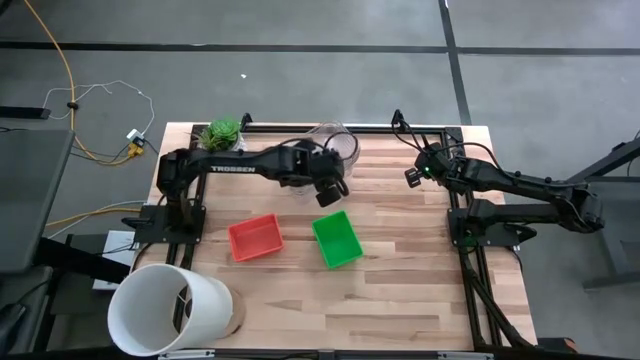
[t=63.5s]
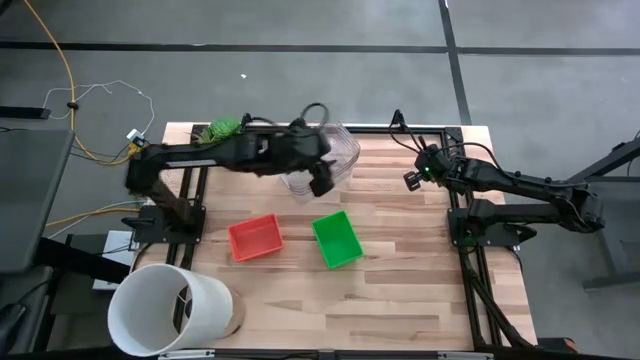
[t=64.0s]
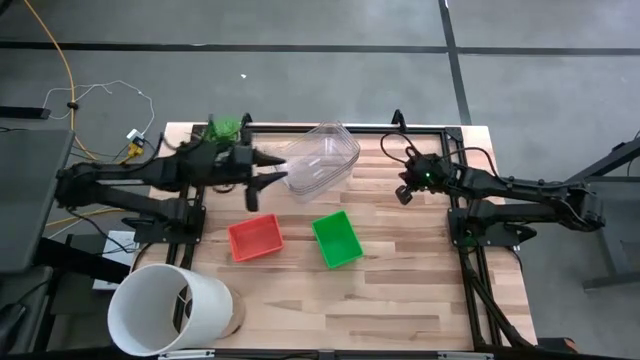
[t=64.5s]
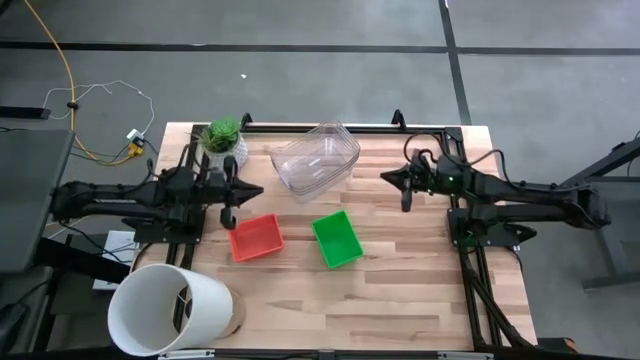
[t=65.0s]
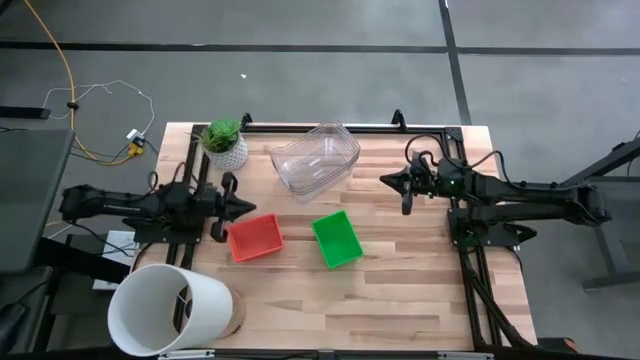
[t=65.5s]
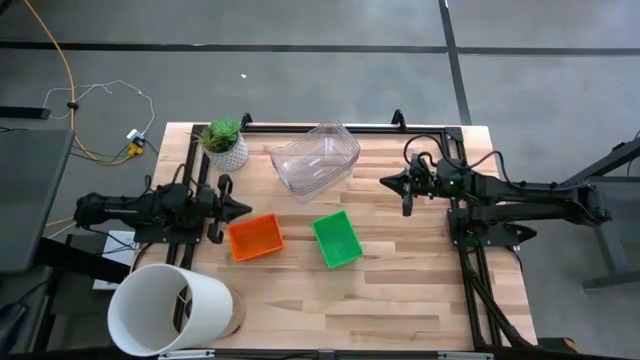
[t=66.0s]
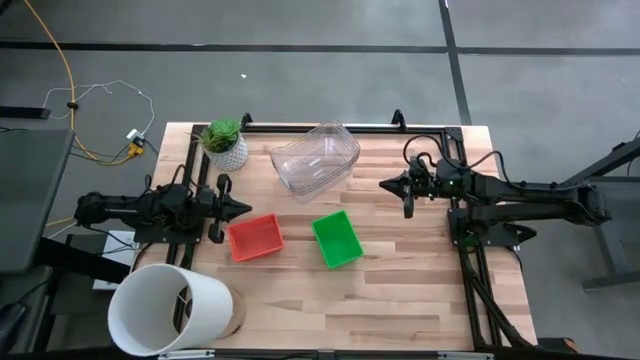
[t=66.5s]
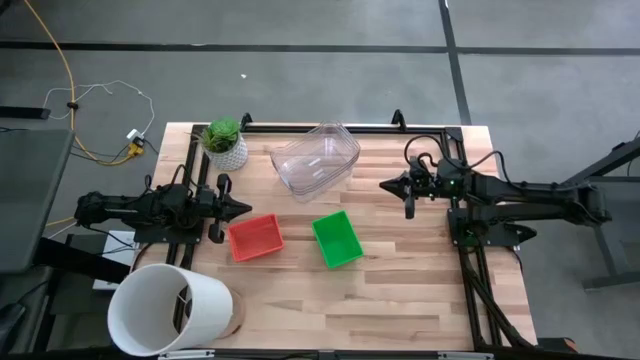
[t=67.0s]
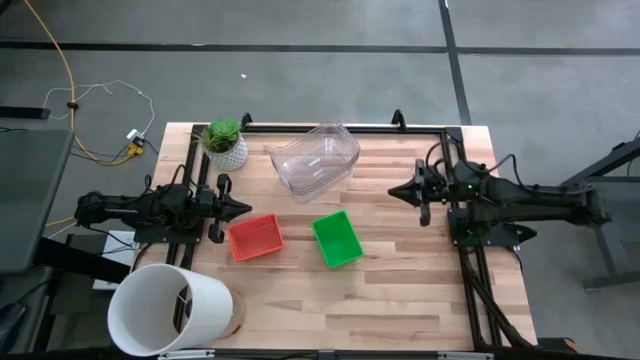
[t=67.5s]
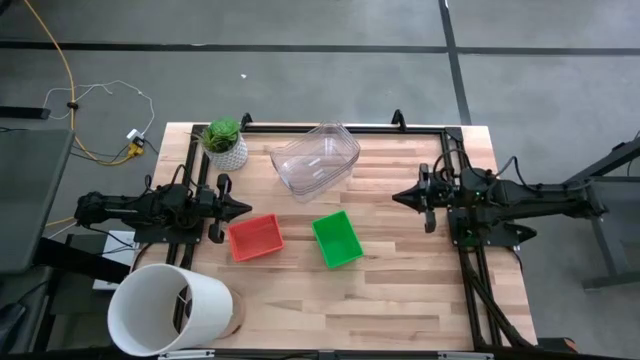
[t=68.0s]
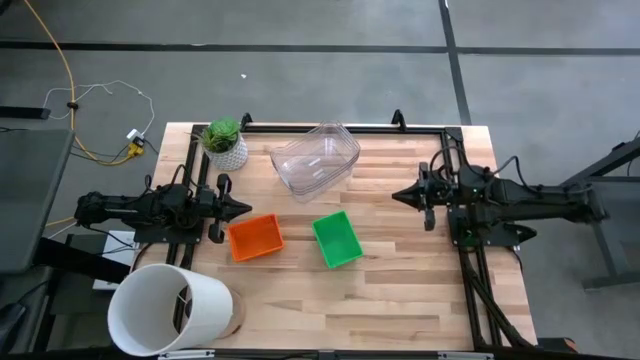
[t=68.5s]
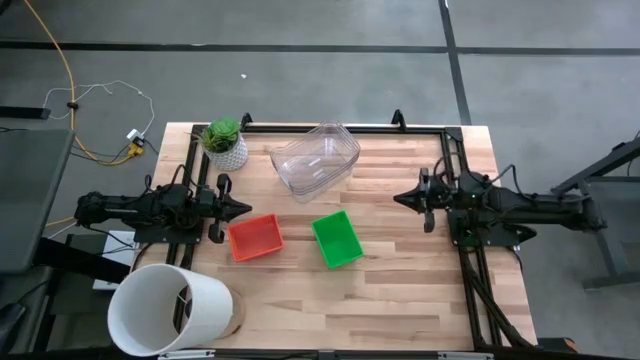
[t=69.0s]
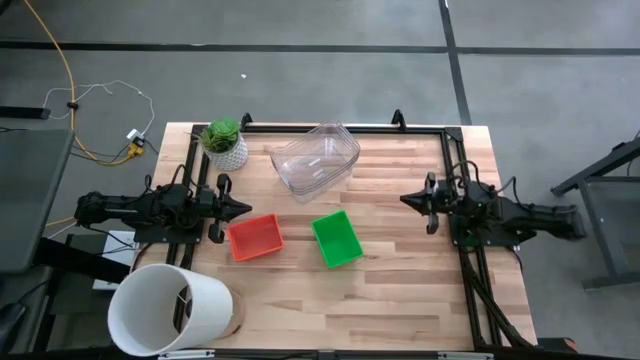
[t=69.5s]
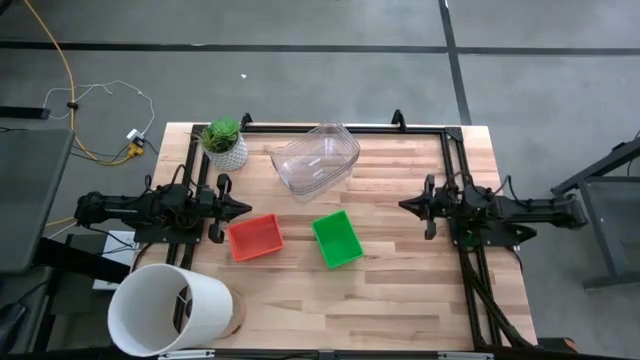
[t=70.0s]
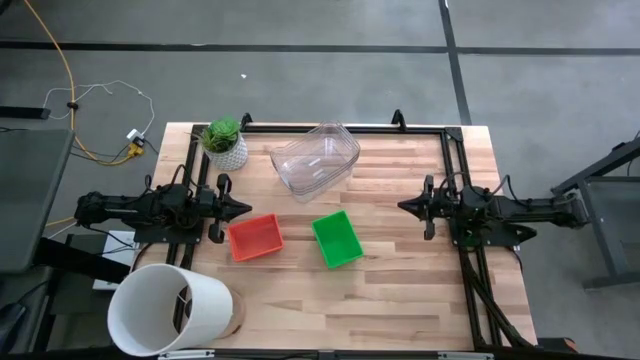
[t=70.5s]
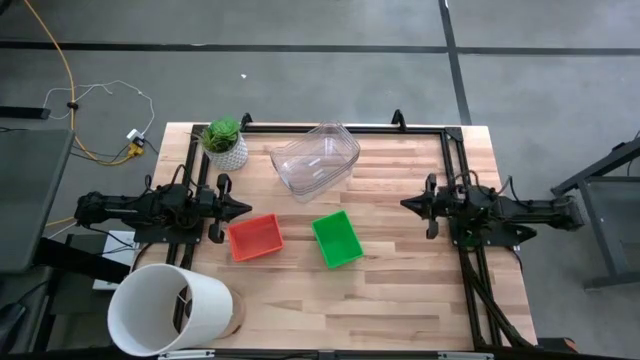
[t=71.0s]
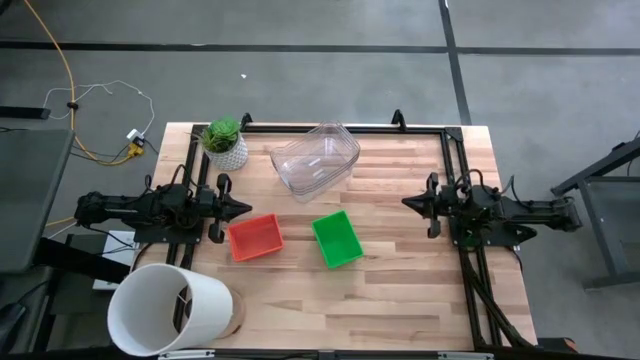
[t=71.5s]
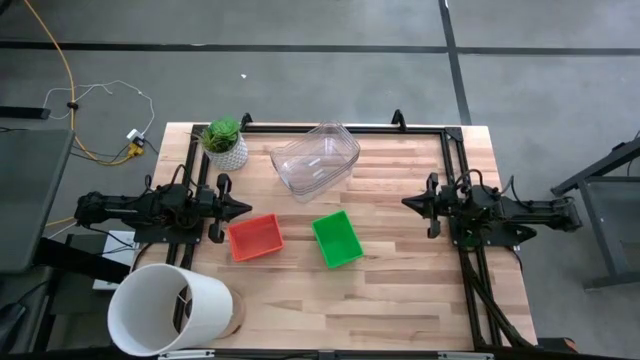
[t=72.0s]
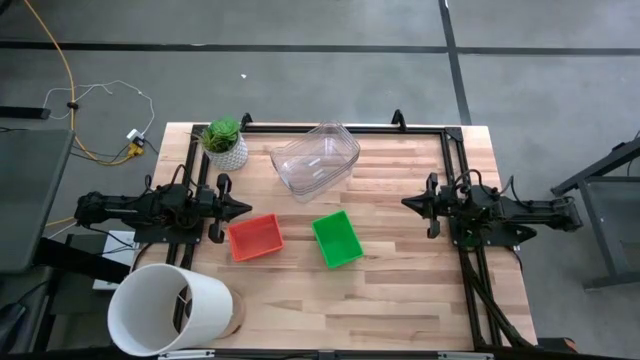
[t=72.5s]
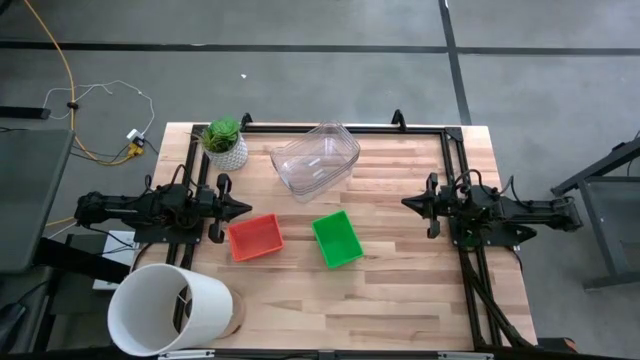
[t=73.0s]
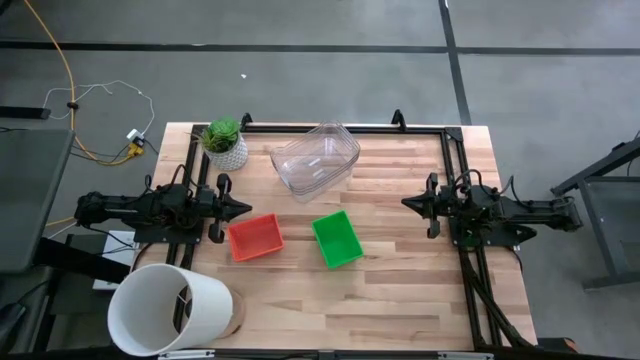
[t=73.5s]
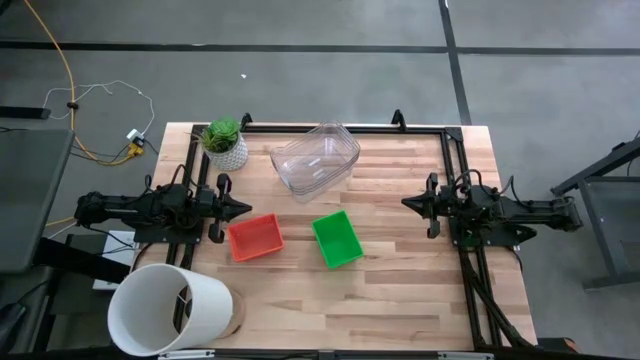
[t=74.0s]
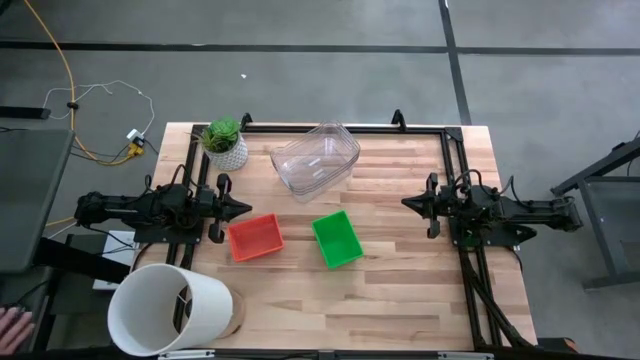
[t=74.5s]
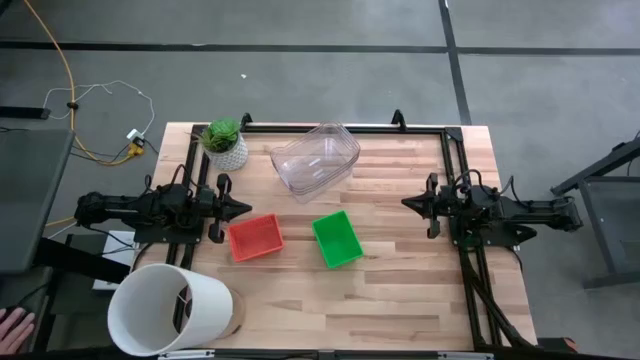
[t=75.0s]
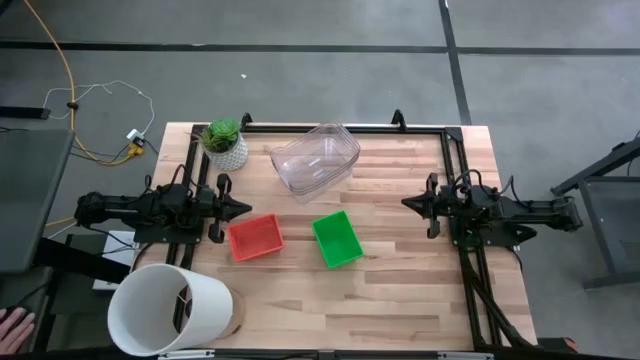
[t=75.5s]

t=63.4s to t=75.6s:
Return to Home Position

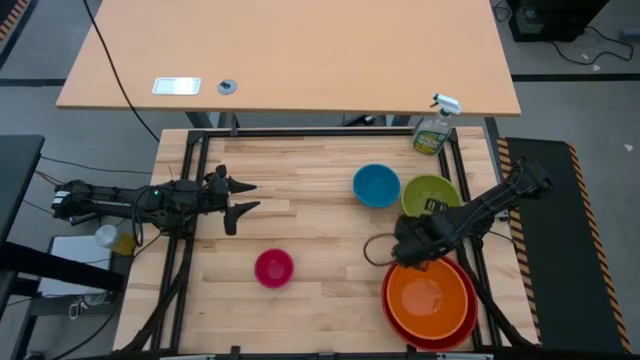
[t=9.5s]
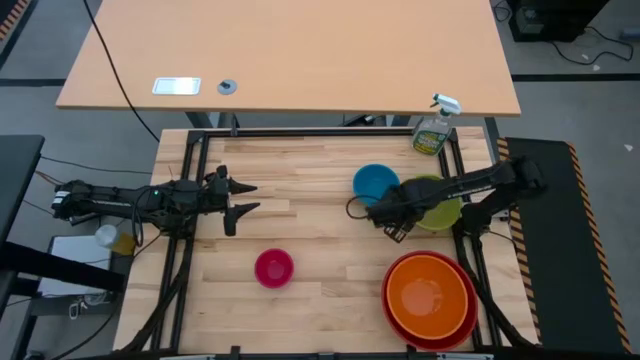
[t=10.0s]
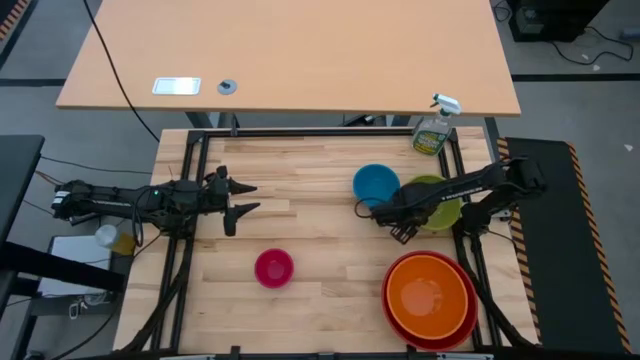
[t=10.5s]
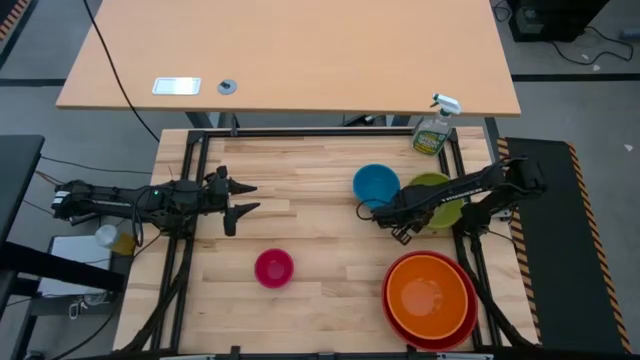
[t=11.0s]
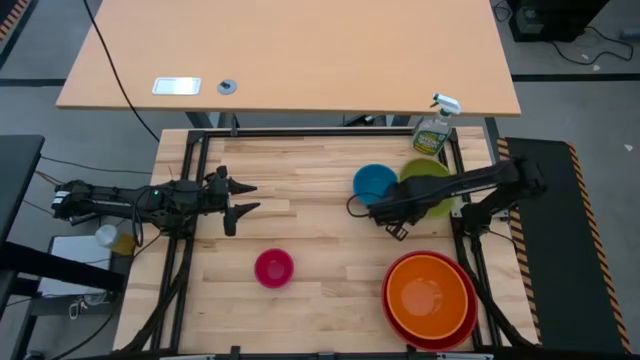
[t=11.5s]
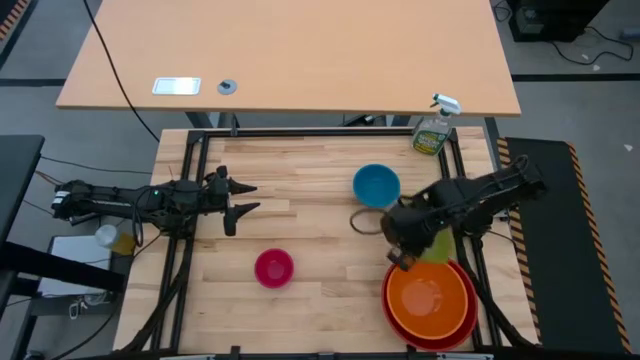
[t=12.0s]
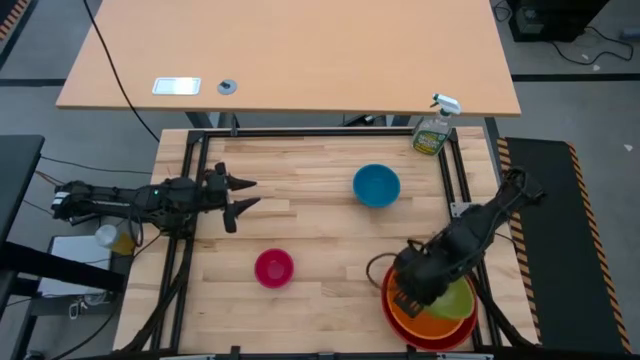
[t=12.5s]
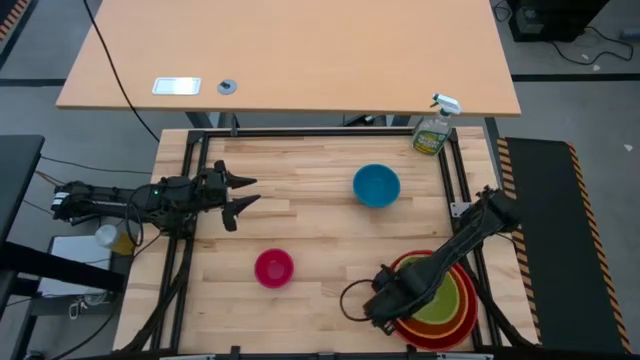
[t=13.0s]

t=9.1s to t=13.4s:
Stack the green bowl on top of the orange bowl

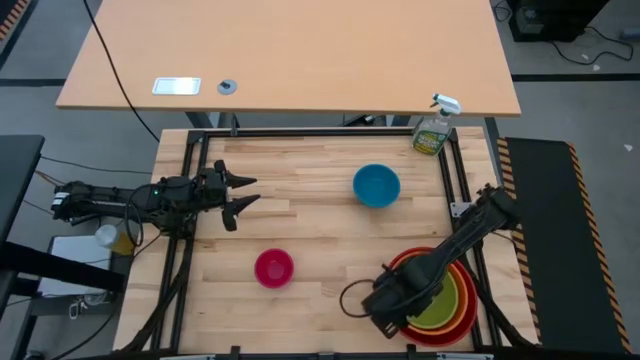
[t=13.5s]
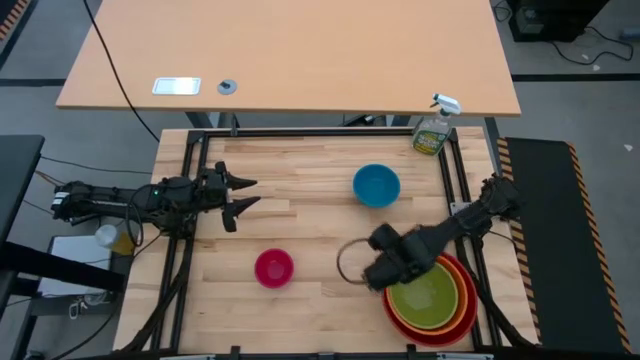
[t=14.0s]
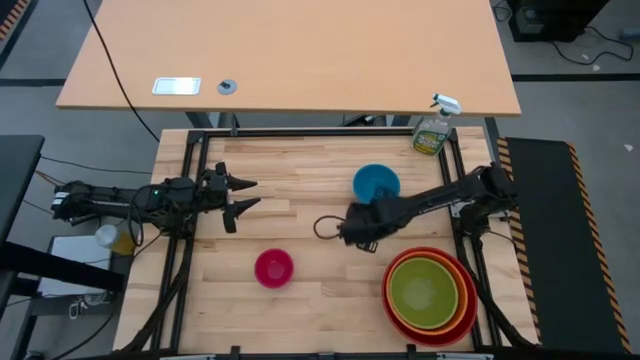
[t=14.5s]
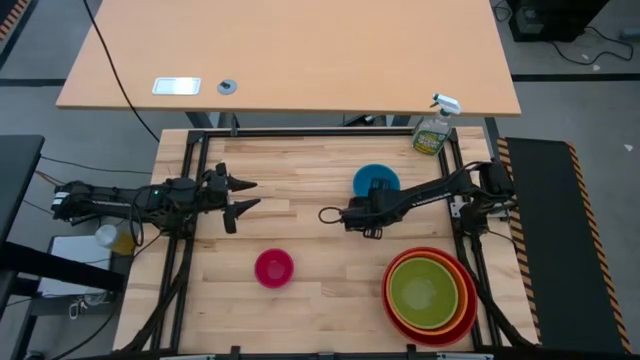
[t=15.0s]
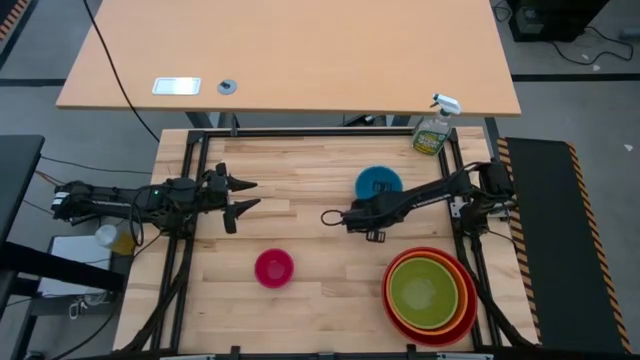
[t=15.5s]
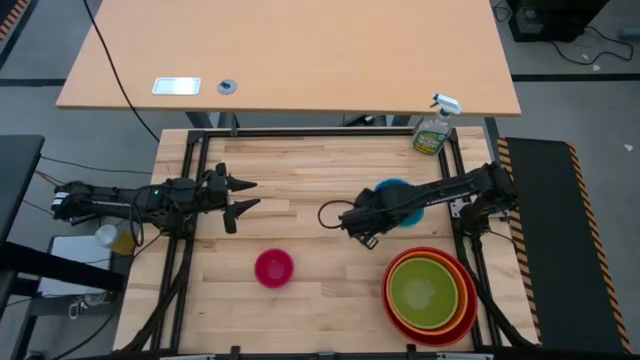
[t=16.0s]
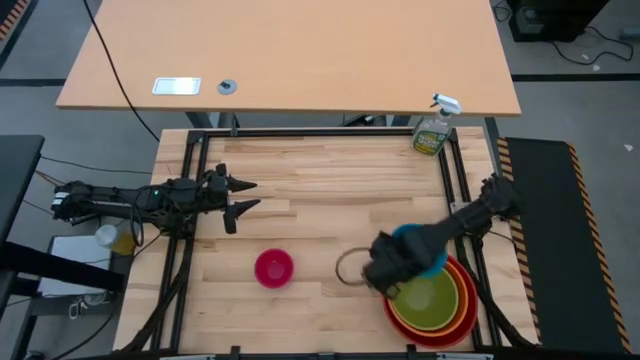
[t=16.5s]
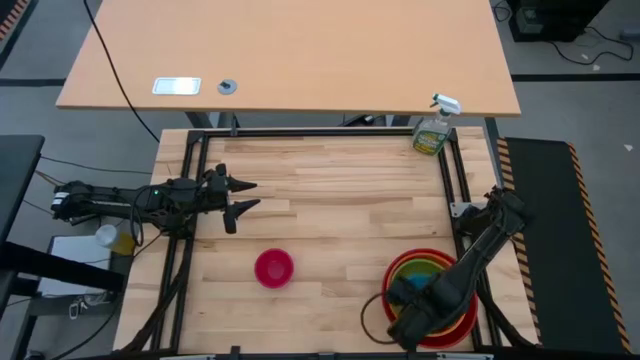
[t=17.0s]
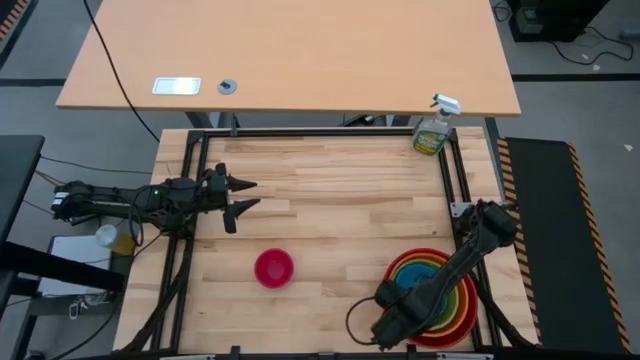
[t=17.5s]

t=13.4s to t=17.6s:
Stack the blue bowl on top of the green bowl
